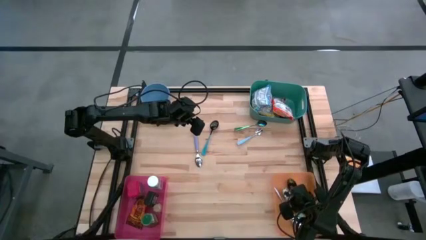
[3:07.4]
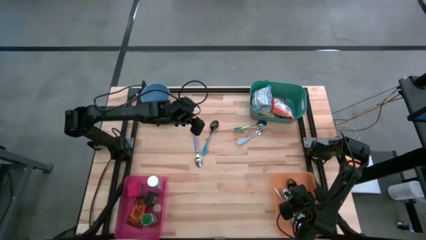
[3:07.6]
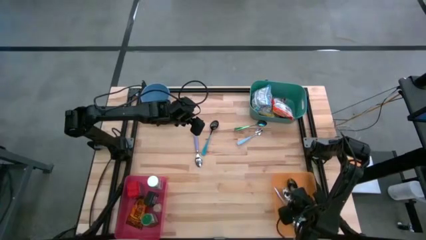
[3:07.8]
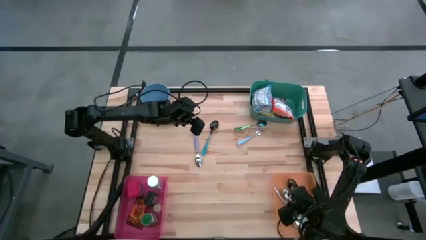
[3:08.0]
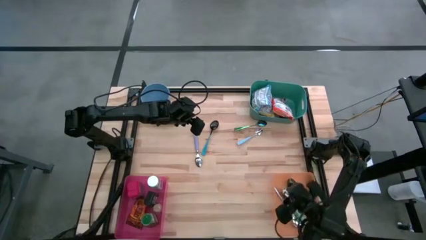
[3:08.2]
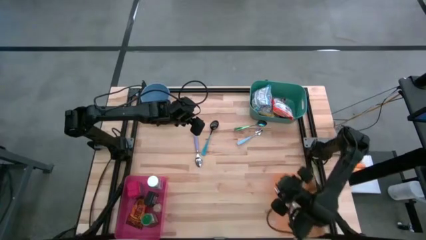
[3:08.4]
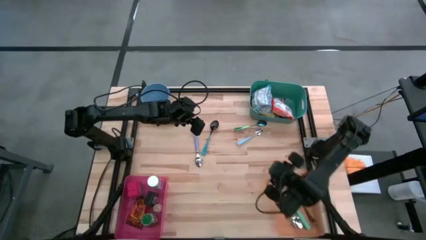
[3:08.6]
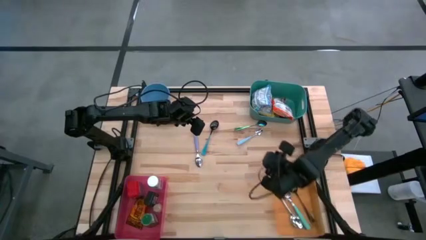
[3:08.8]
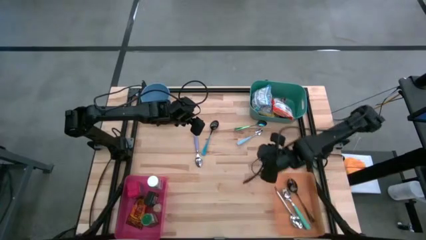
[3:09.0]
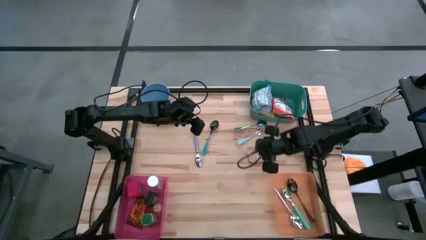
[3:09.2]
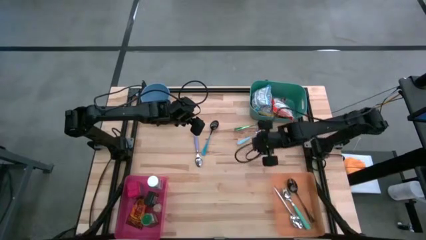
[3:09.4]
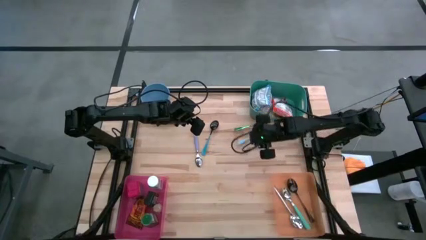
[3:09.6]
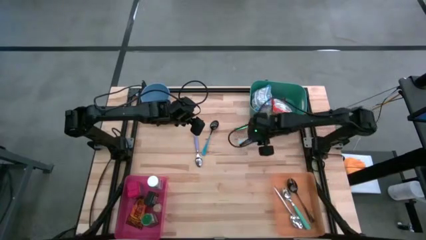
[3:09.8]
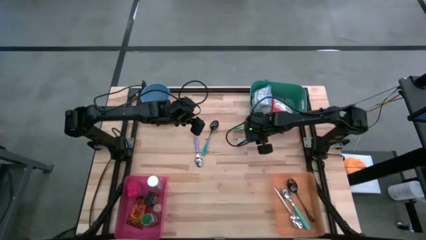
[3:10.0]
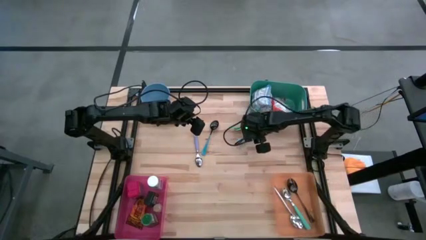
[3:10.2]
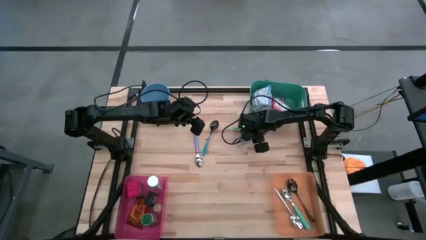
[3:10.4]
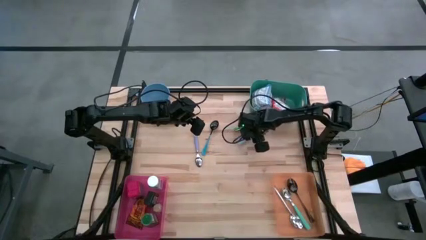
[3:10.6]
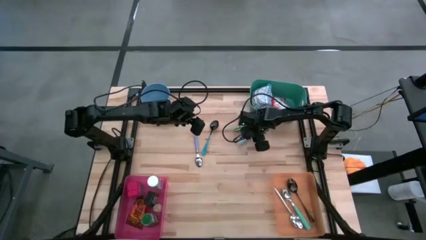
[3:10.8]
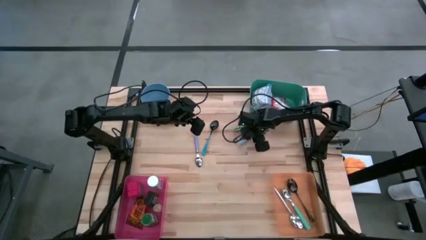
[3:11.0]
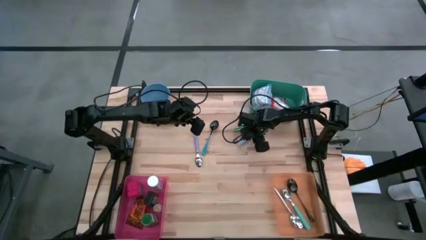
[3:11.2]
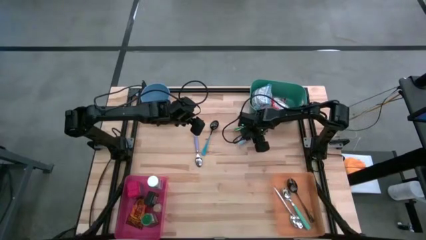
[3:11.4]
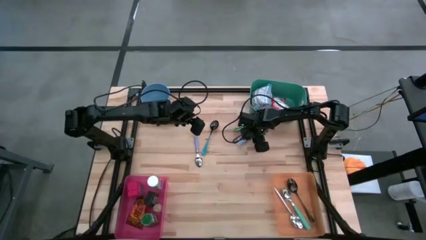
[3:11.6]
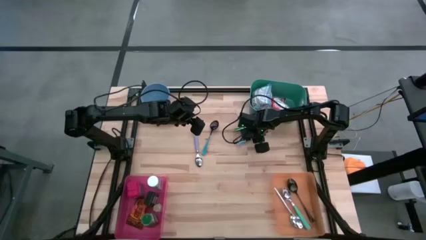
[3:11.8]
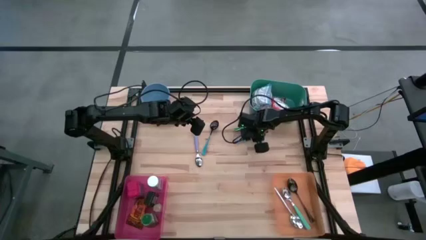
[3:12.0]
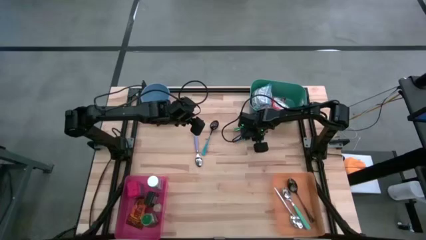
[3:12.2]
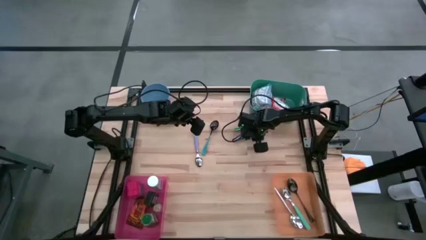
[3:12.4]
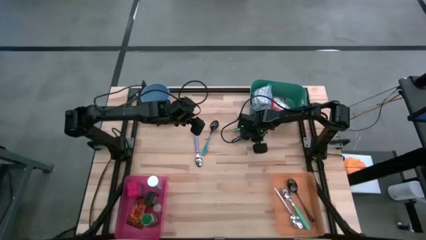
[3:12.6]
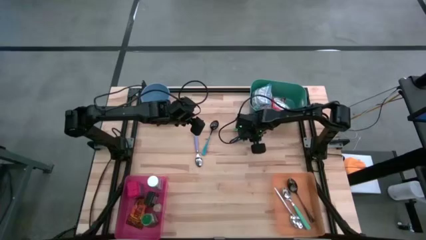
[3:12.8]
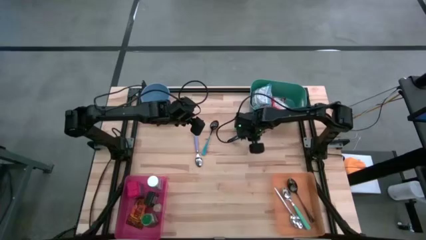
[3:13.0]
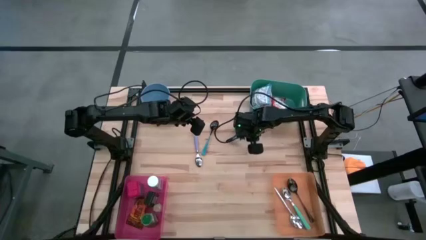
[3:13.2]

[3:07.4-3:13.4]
Put the light blue spoon into the orange bin

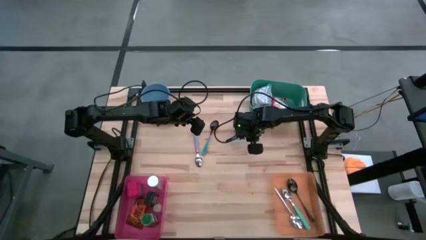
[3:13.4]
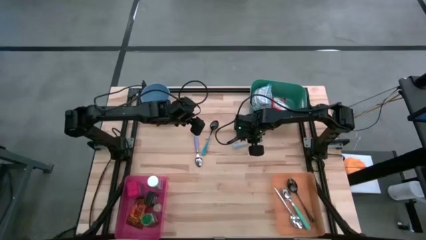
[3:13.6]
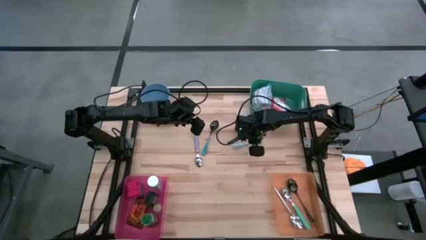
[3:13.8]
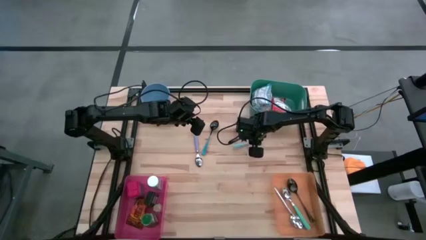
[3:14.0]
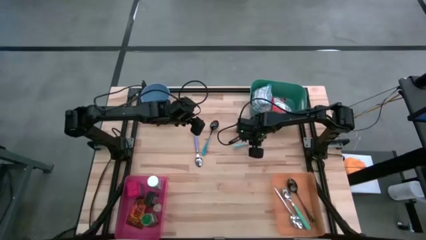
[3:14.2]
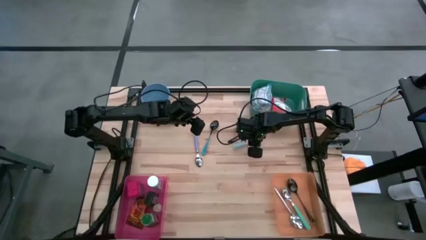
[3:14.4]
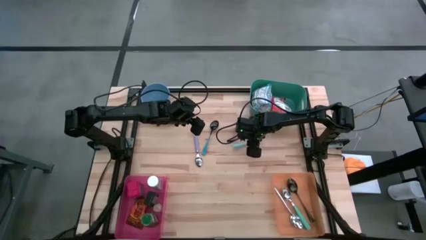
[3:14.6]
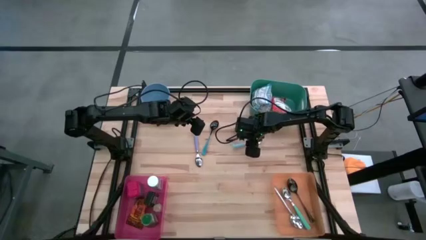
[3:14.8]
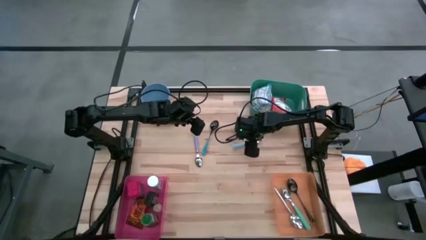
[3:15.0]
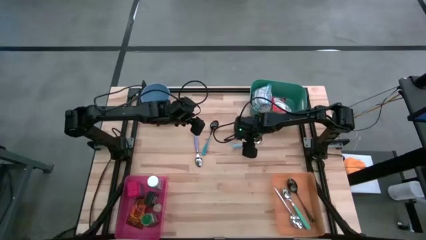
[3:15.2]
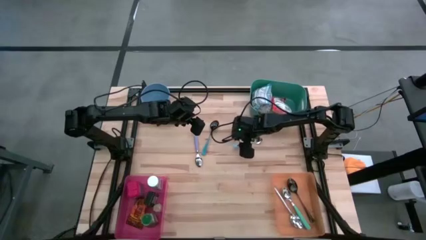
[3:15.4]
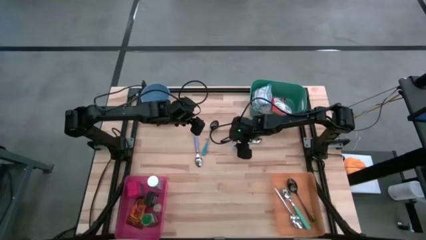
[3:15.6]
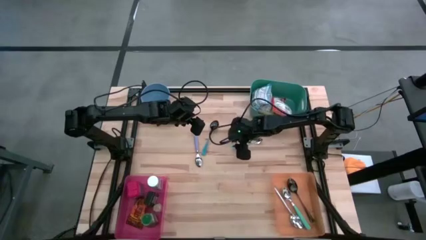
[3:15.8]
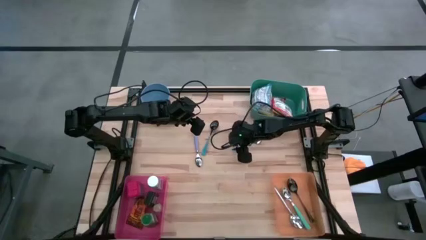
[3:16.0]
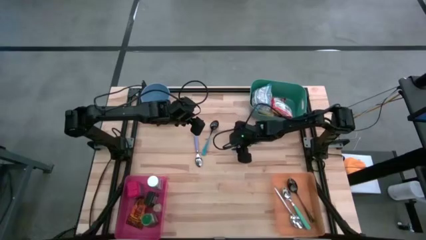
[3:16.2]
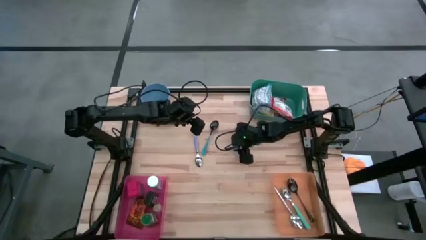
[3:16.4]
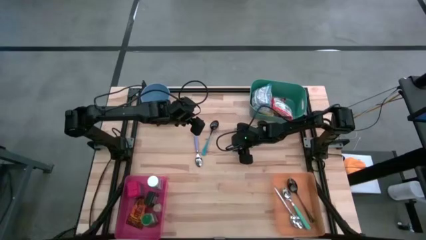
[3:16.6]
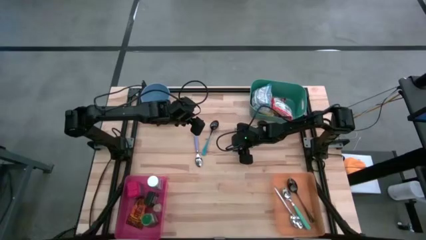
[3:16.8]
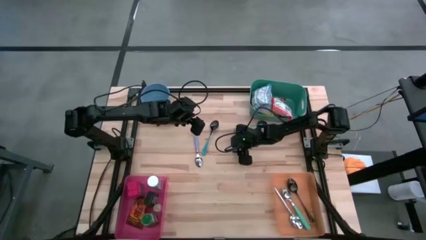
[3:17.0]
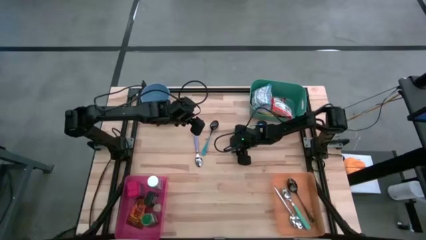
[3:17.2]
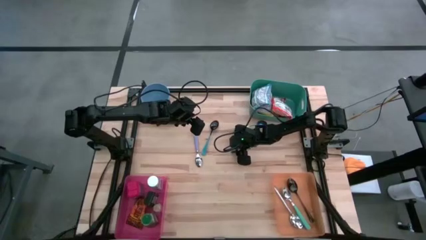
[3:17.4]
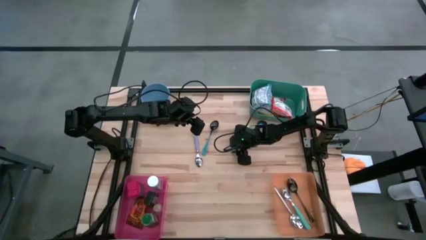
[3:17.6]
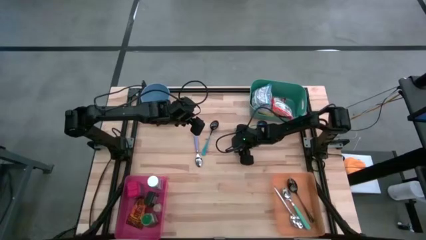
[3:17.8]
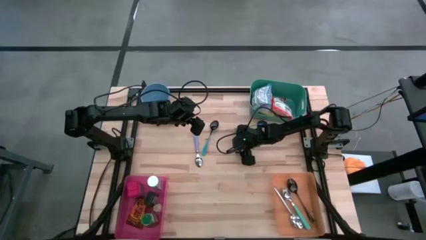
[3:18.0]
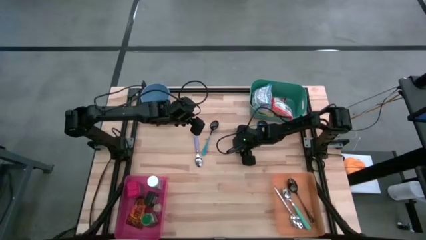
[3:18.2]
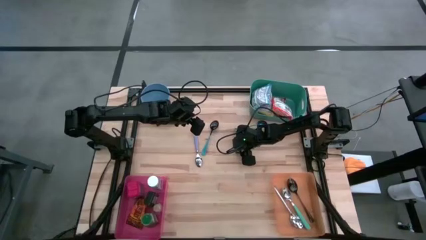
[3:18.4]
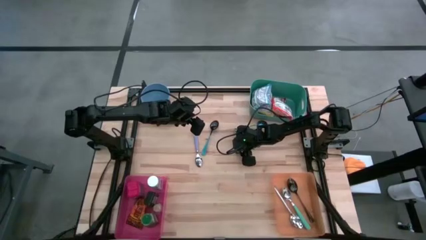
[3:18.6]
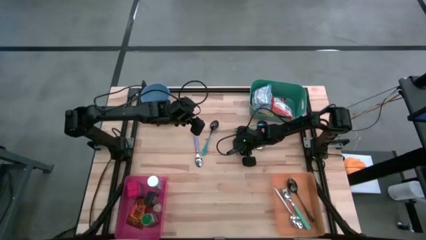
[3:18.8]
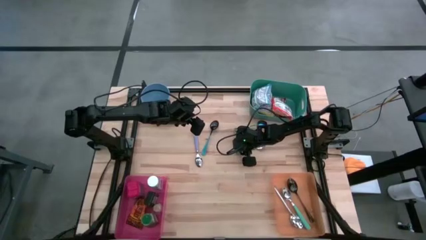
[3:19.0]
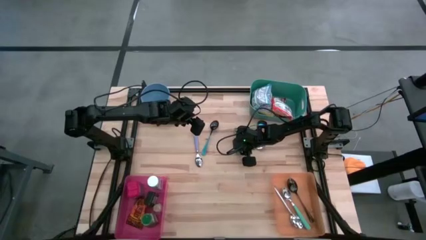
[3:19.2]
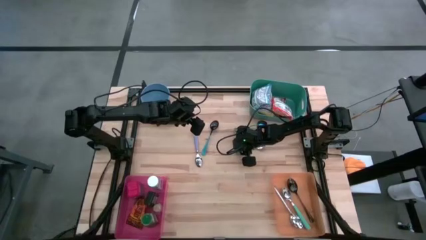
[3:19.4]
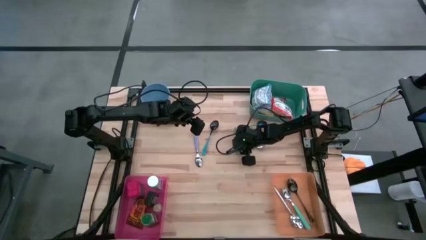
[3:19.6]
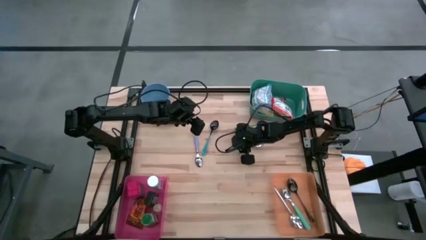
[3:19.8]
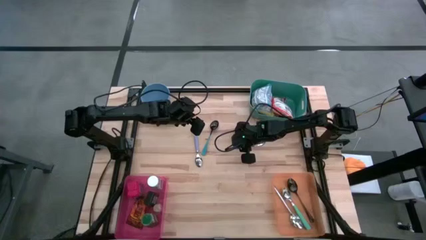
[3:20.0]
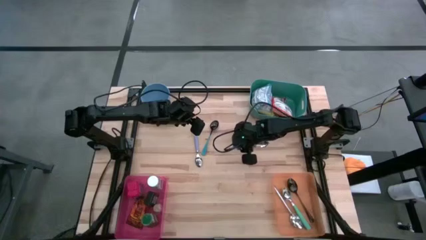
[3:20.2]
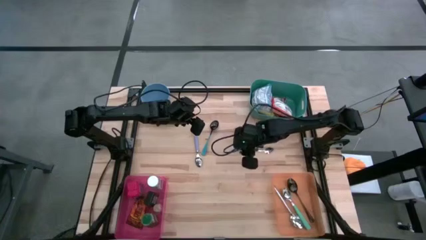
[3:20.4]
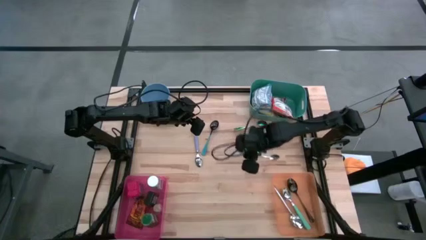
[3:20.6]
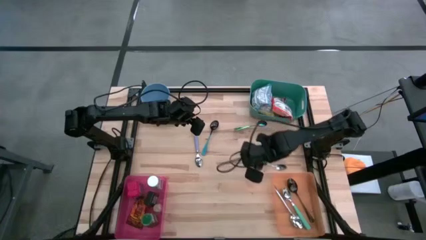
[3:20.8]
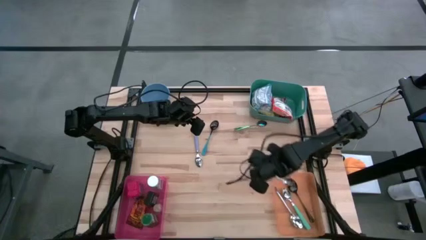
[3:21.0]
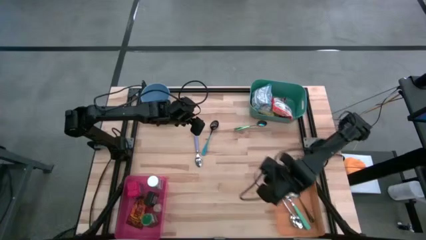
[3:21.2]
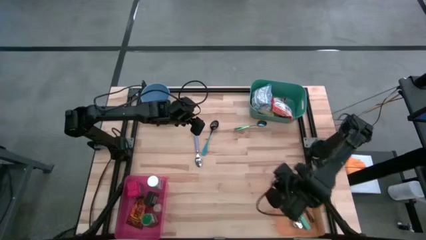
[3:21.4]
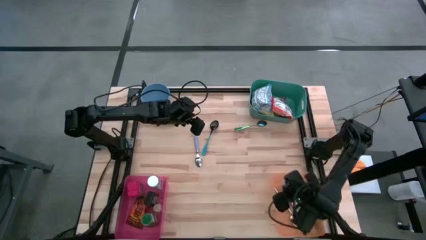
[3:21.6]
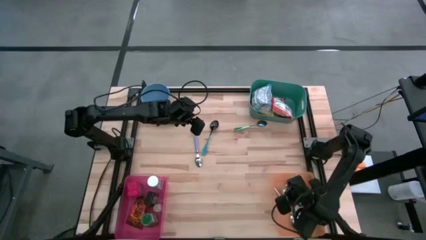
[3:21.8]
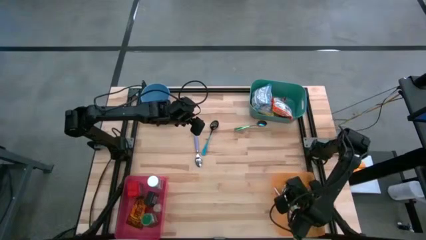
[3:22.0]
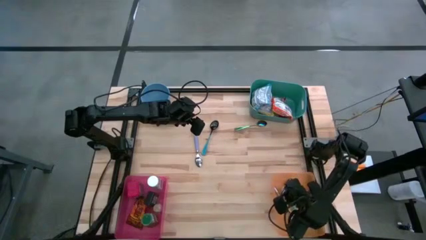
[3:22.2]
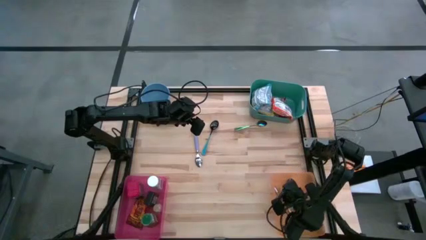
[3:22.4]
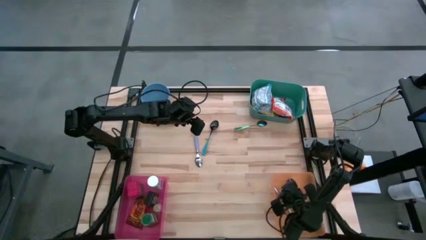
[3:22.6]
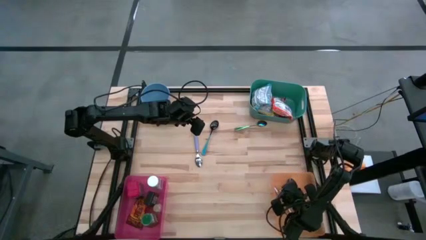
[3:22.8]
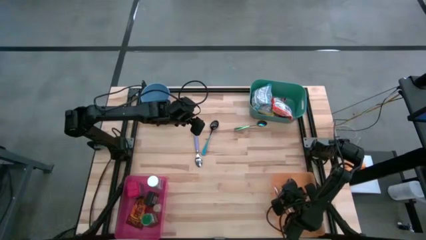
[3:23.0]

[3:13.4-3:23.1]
Put the light blue spoon into the orange bin
